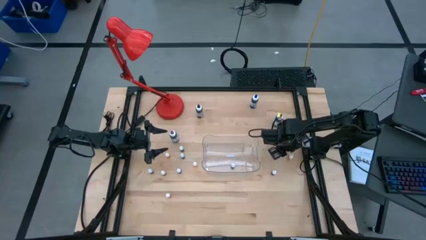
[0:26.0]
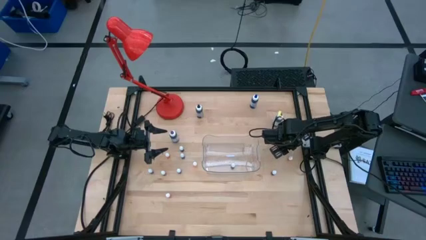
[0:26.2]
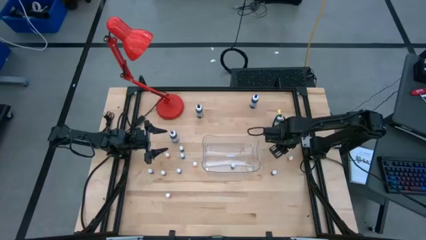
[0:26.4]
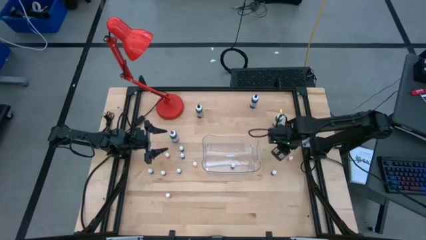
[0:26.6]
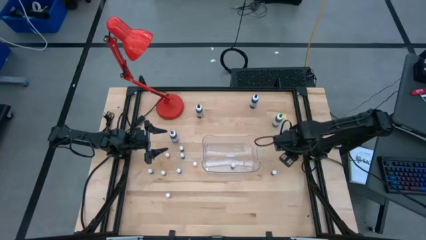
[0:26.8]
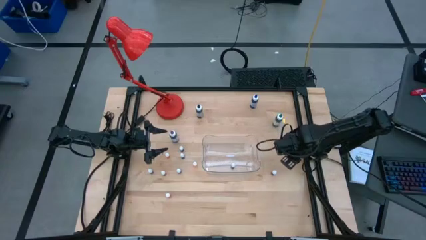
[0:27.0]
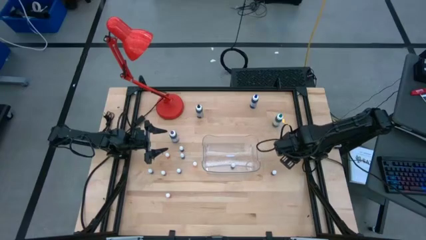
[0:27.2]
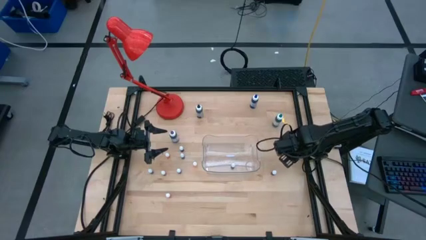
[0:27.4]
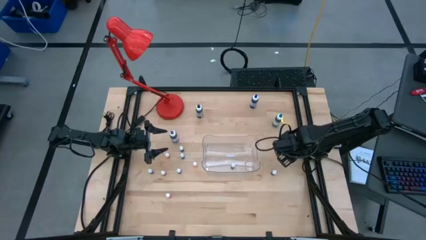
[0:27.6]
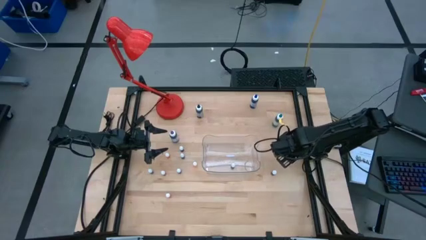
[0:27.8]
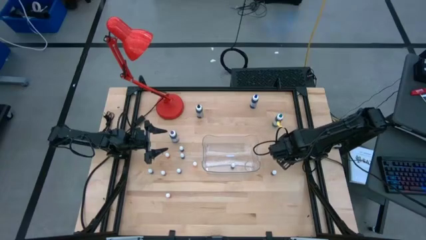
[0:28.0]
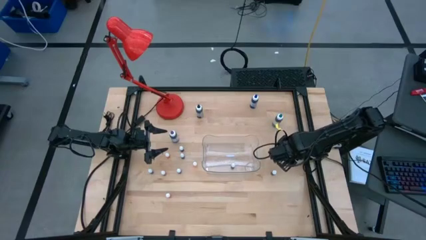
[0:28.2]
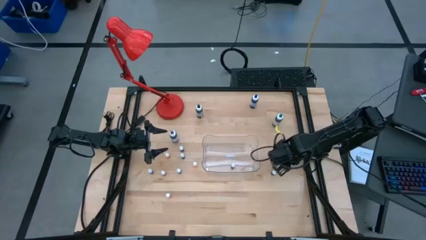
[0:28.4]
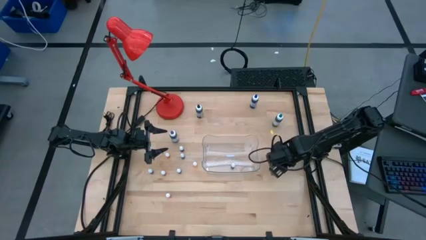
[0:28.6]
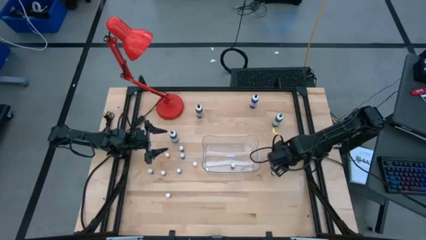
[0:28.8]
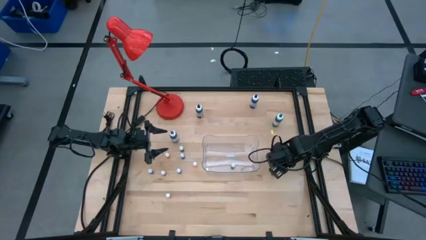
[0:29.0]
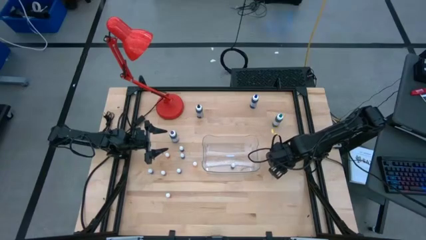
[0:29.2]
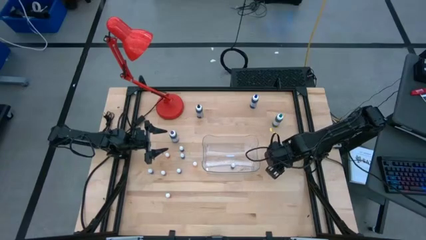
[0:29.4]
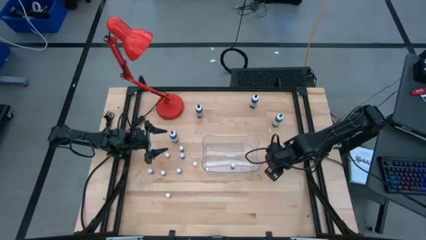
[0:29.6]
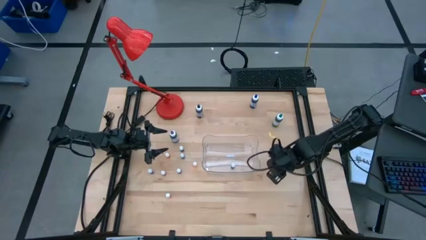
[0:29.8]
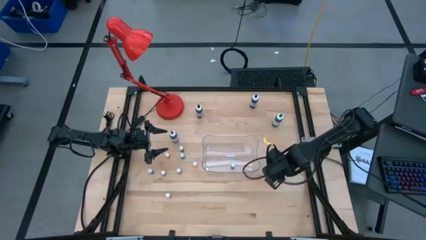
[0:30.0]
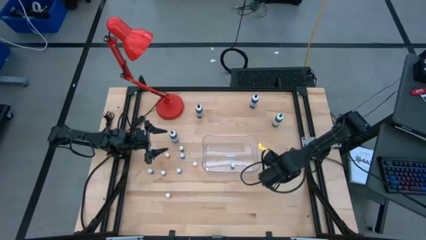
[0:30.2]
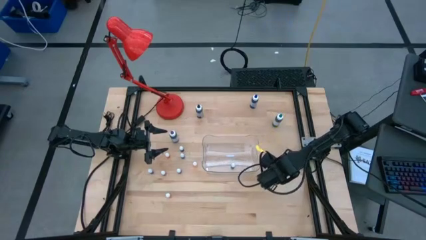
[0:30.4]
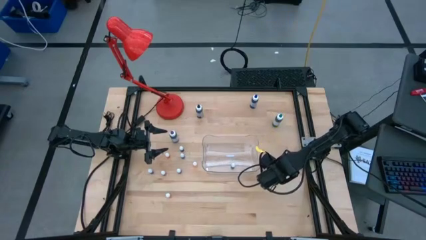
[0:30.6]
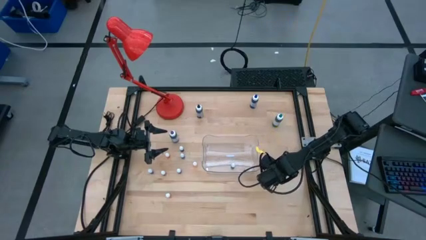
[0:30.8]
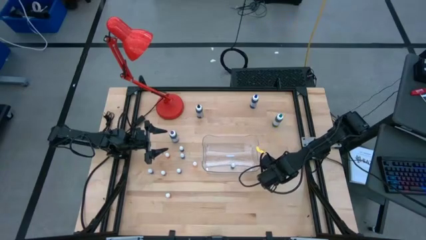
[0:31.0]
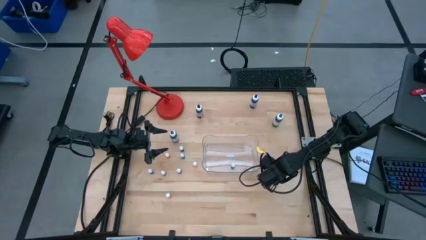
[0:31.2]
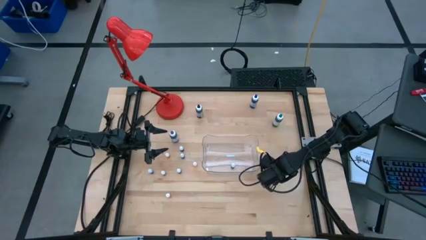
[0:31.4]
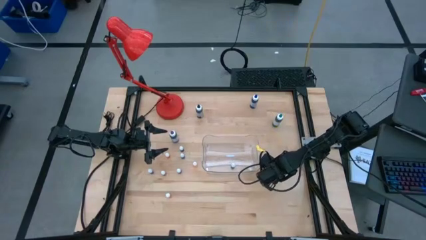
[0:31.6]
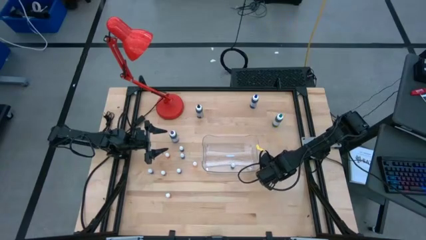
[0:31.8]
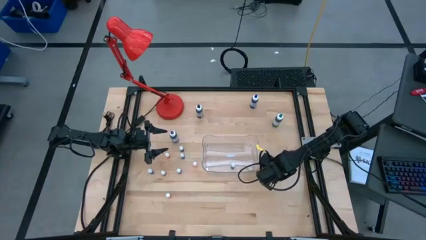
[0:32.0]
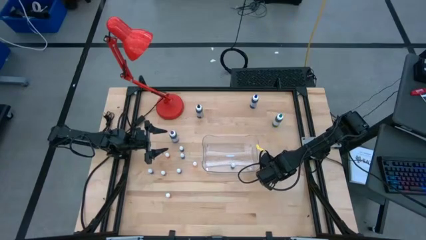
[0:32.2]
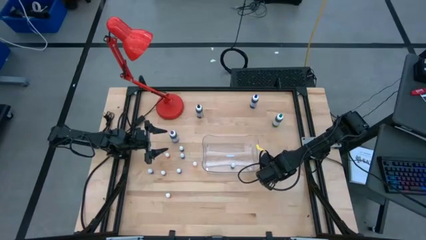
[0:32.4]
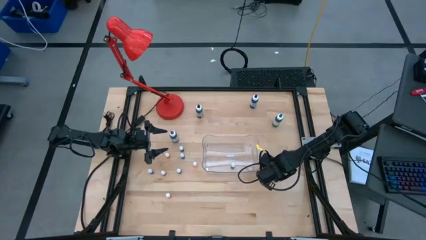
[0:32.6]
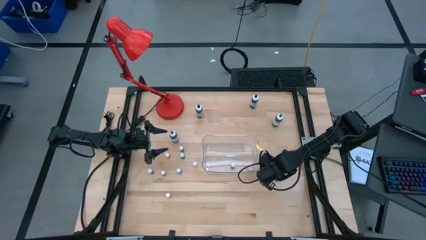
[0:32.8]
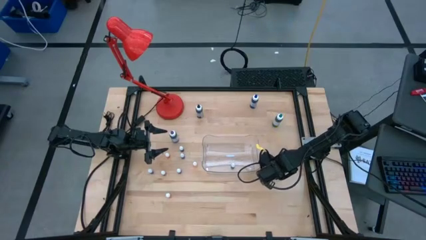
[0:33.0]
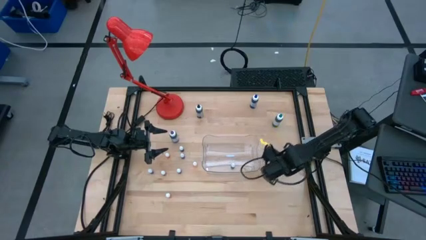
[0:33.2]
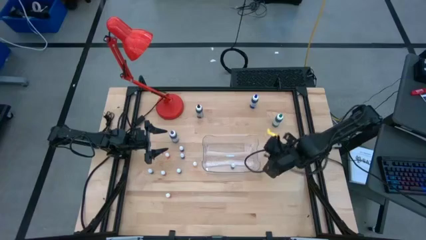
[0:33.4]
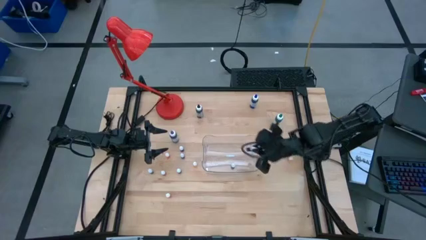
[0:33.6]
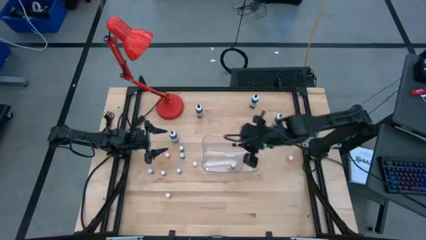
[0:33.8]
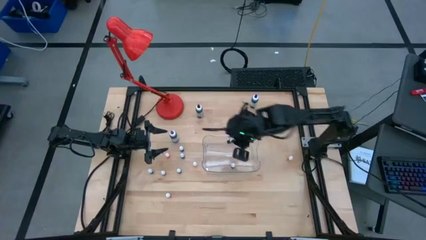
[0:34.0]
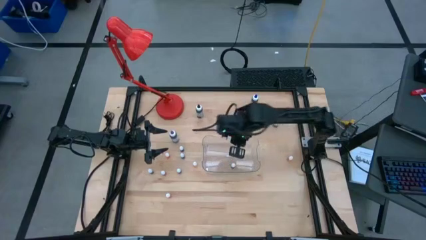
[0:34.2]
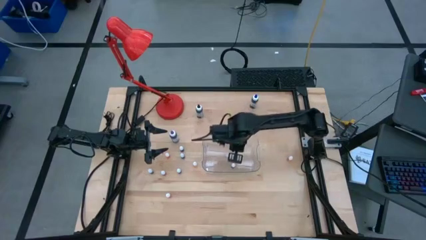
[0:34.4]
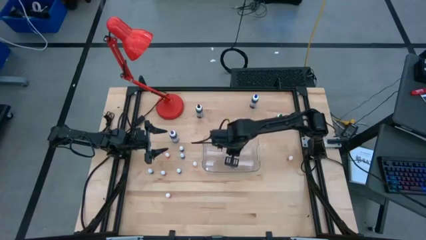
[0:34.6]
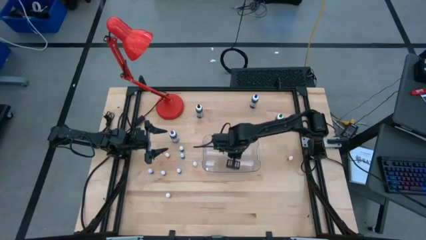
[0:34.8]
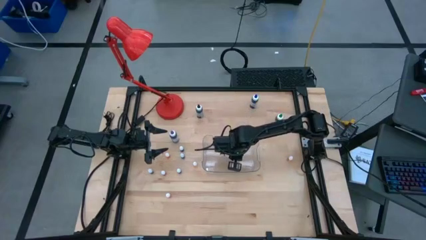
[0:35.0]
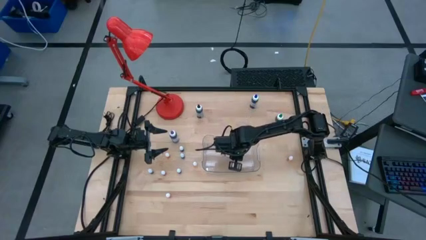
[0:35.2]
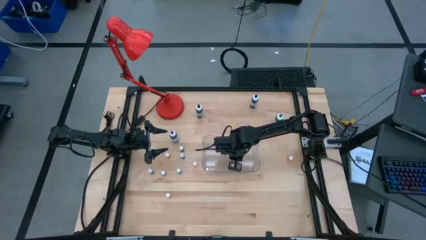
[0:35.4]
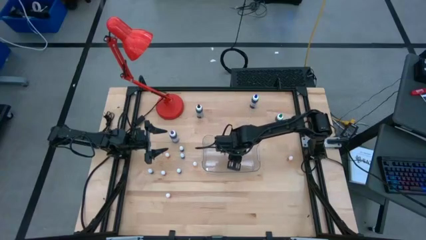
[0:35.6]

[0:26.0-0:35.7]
Task: Pick & Place food coloring
Put the small purple food coloring bottle into the transparent bin
